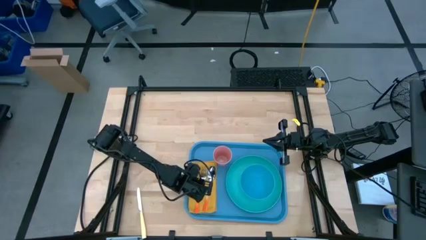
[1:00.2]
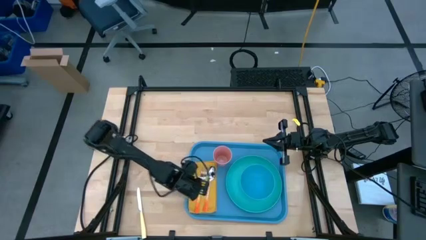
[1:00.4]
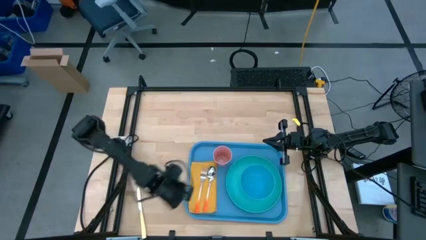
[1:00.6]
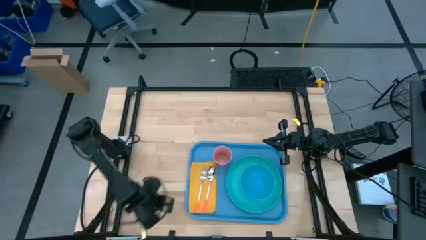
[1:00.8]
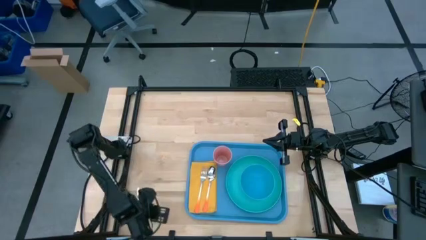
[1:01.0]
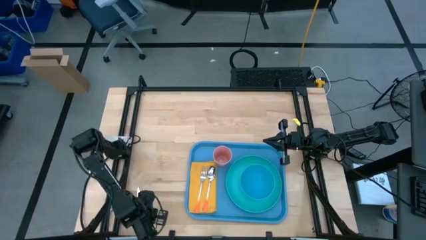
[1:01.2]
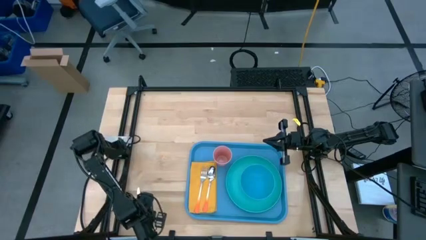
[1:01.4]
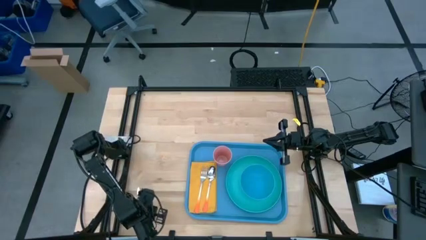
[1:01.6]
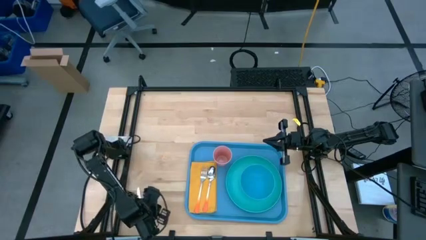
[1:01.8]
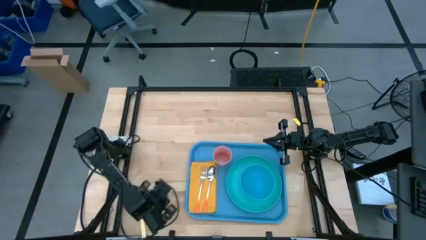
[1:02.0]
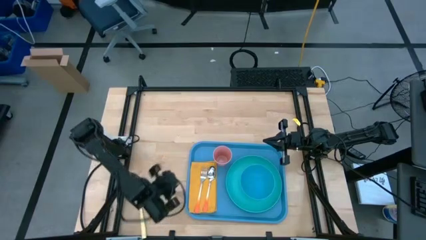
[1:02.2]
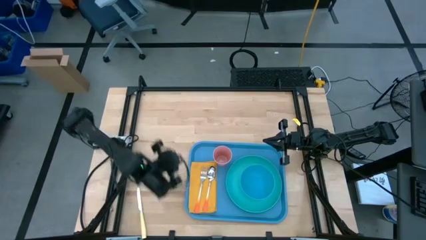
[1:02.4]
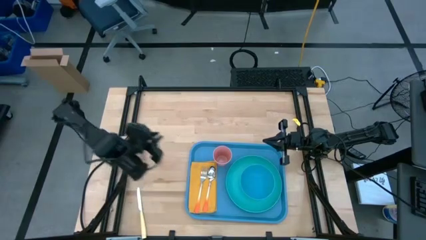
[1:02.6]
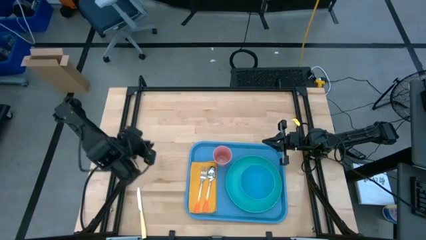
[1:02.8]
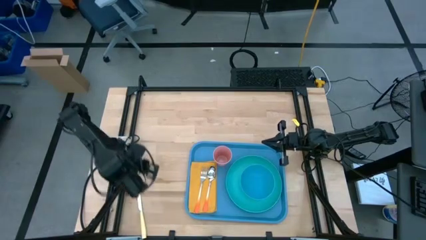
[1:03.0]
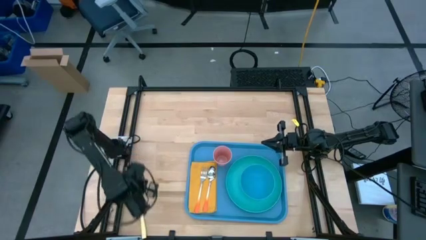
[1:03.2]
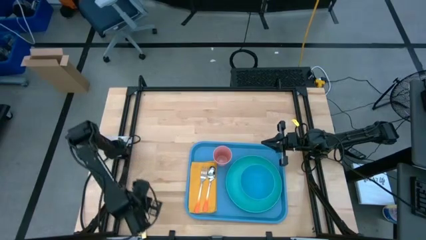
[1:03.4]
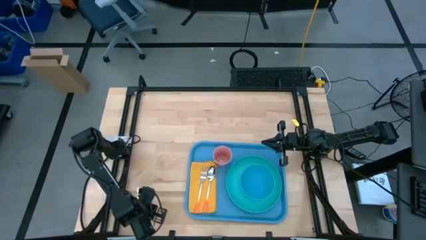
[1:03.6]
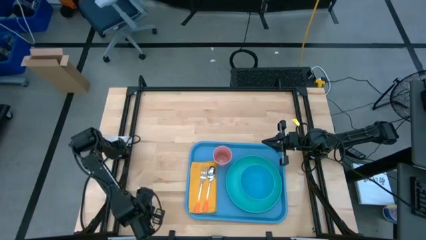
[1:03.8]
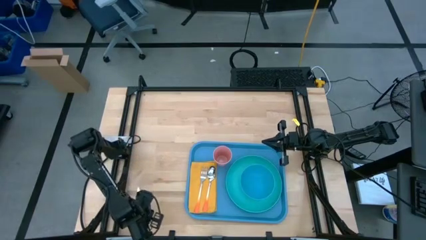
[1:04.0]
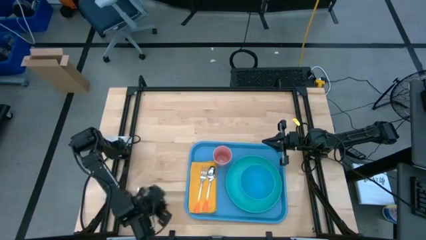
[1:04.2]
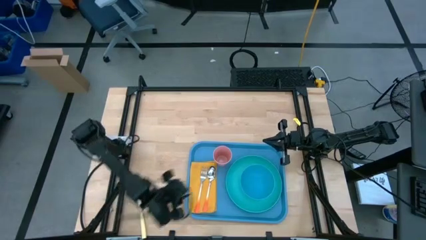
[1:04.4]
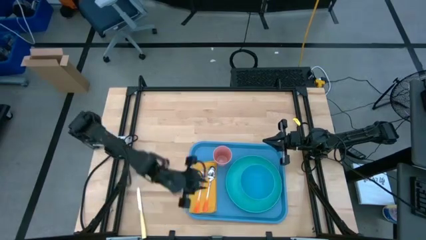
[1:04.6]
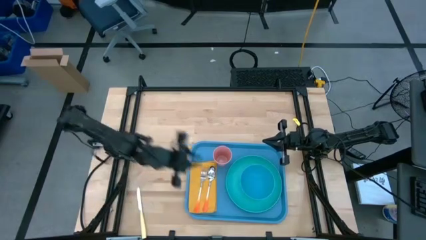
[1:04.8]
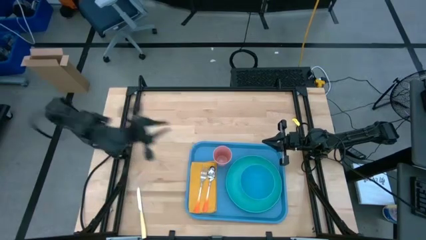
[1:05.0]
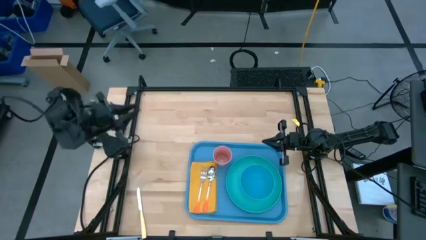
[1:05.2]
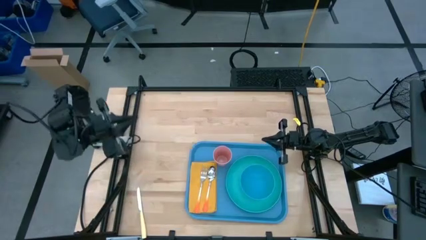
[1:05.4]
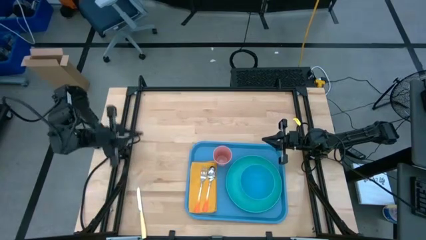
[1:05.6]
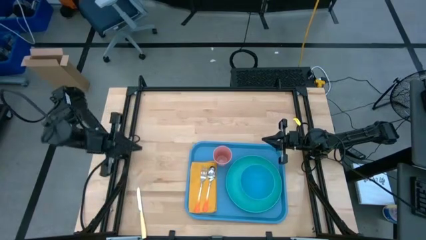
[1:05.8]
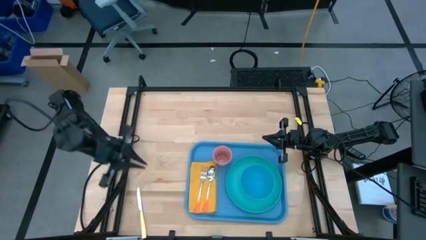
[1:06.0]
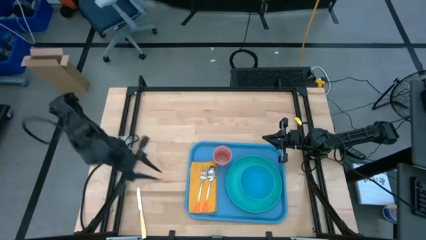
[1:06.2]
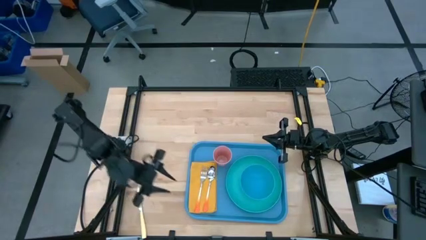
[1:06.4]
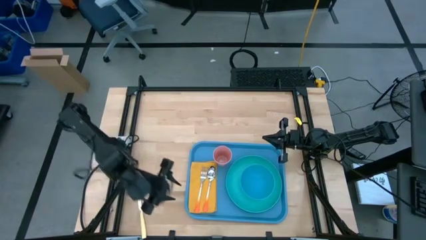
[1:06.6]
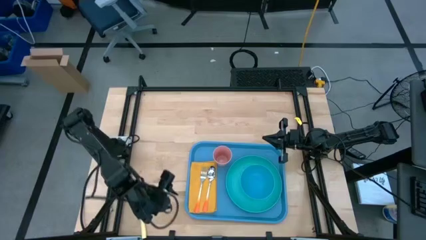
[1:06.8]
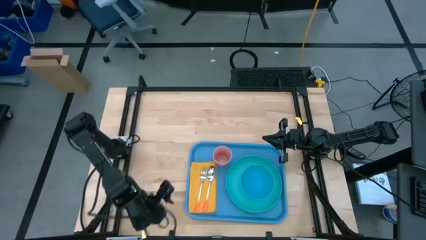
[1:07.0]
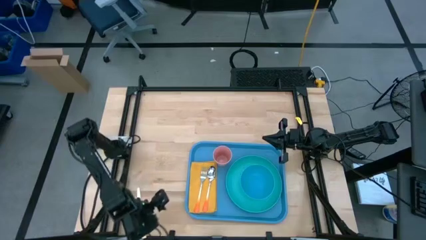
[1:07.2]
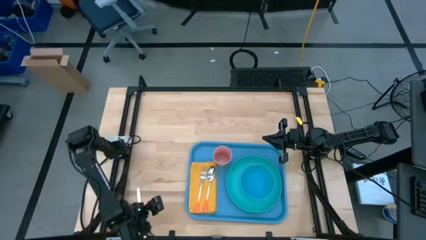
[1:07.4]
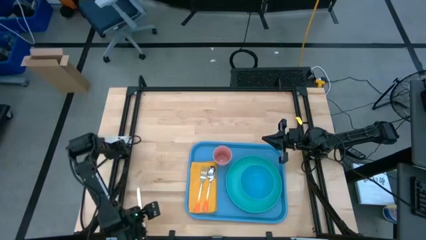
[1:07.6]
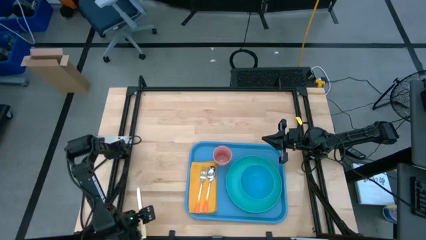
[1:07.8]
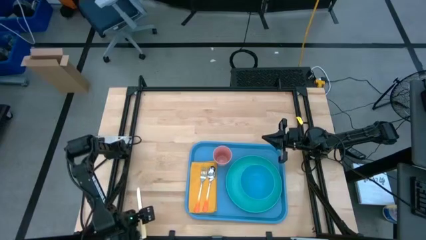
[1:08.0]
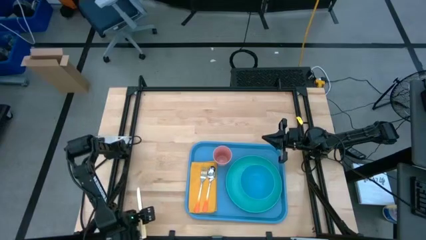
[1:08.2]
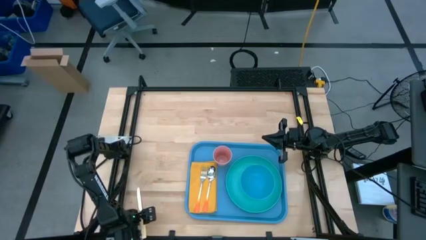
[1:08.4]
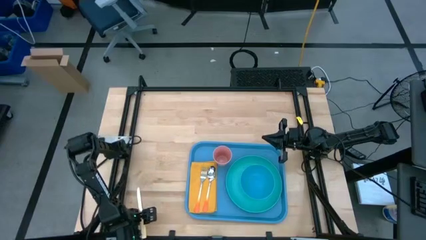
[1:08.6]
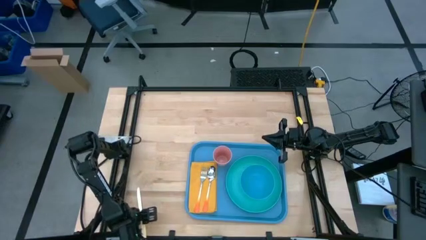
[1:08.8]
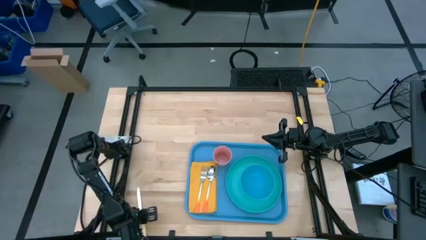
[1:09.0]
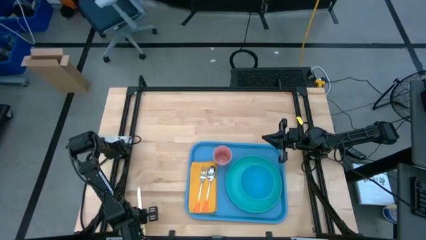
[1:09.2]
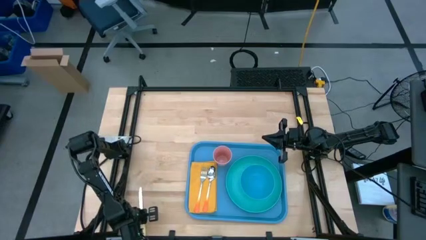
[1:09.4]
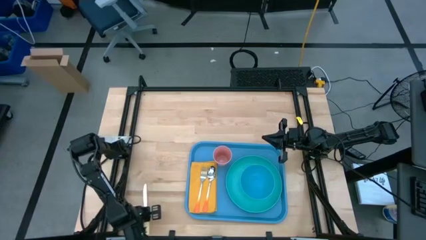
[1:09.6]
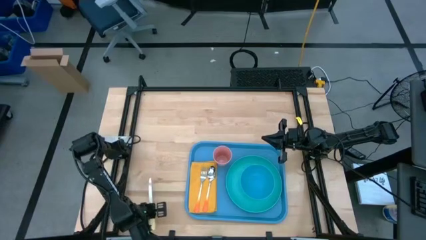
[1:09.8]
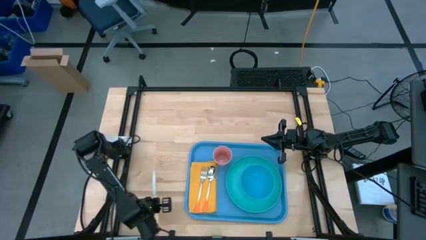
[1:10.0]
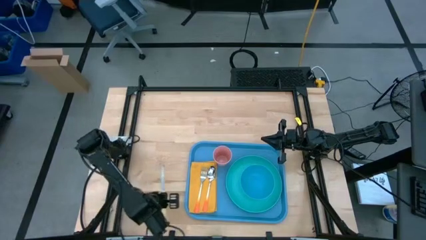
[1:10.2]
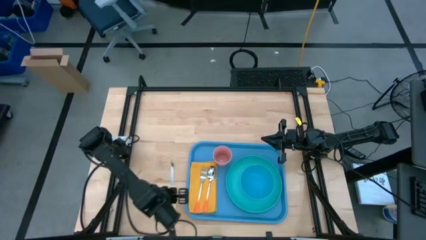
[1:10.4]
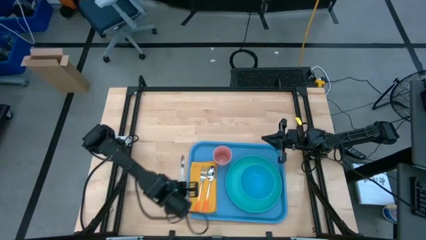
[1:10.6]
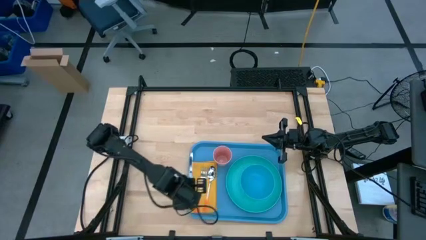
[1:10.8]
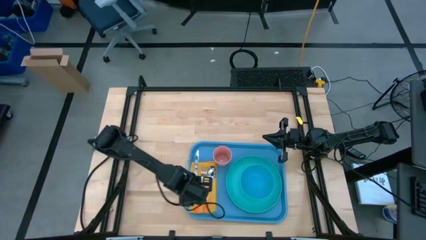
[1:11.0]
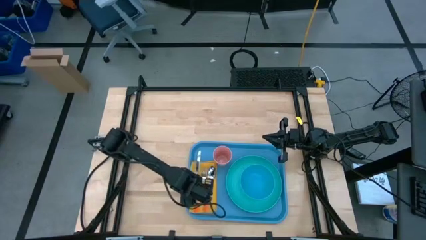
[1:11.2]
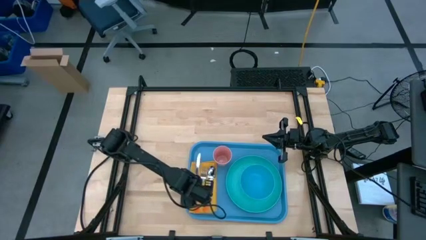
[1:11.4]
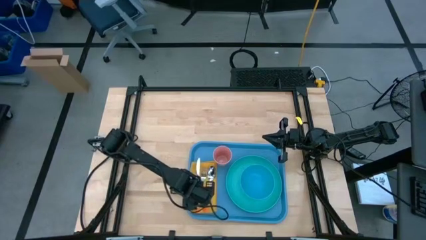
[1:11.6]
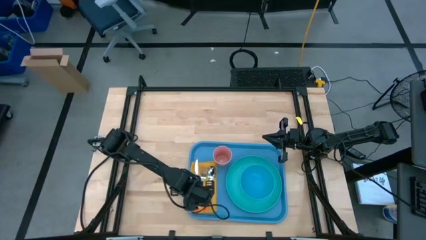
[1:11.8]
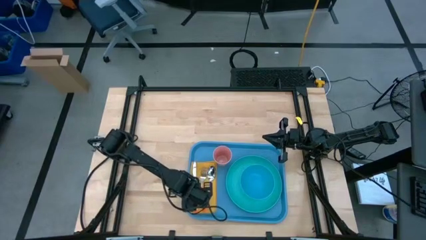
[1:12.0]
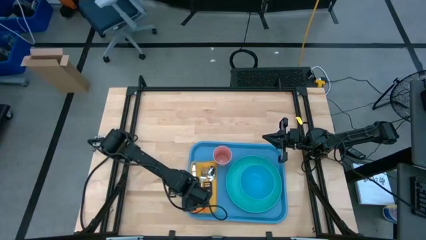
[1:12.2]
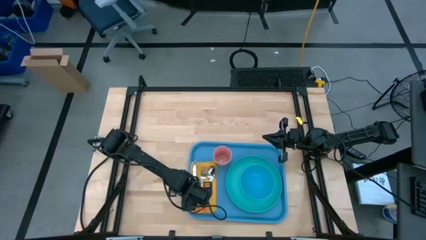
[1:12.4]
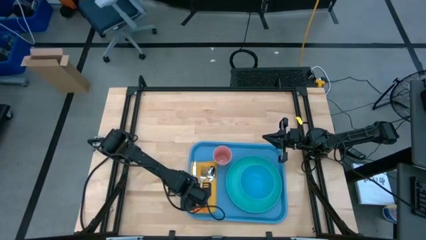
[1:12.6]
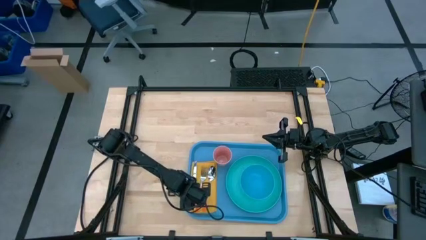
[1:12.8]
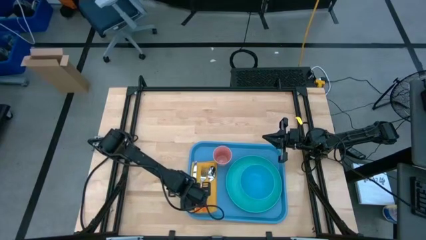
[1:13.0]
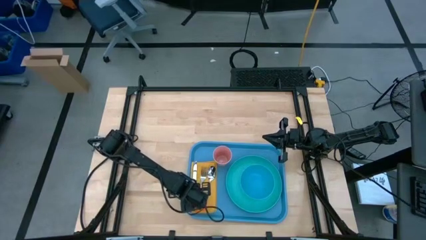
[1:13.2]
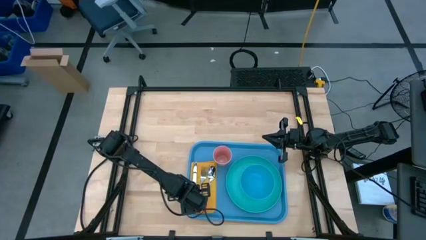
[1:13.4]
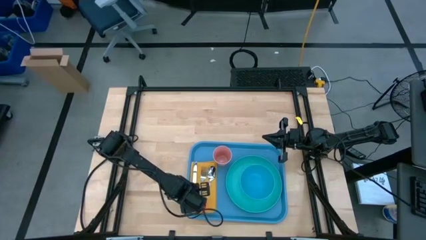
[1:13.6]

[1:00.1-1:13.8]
Task: Set up tray
Put the yellow knife on the yellow napkin to the left of the orange fork
